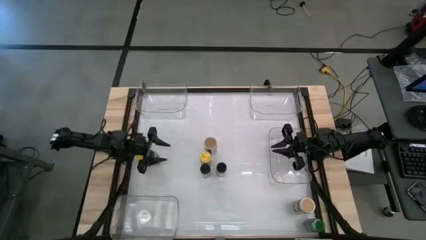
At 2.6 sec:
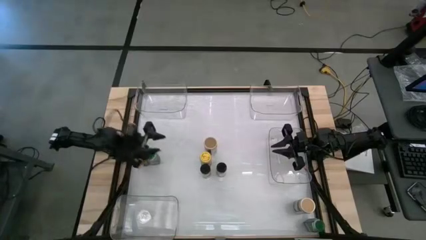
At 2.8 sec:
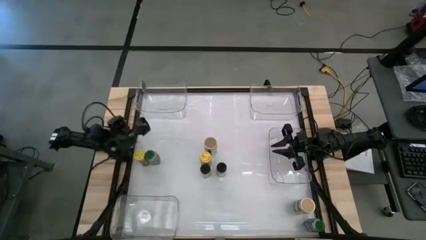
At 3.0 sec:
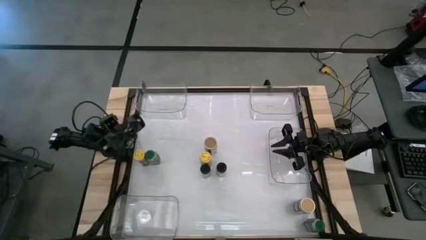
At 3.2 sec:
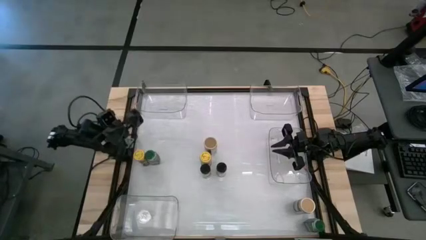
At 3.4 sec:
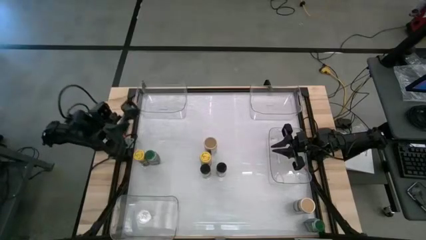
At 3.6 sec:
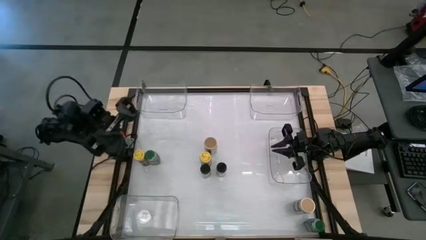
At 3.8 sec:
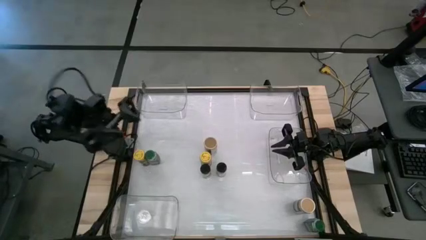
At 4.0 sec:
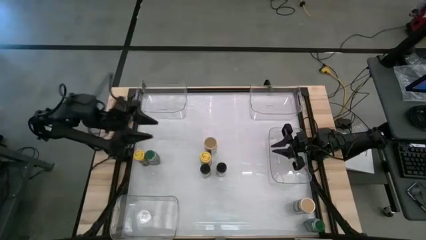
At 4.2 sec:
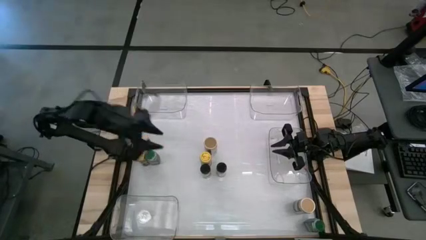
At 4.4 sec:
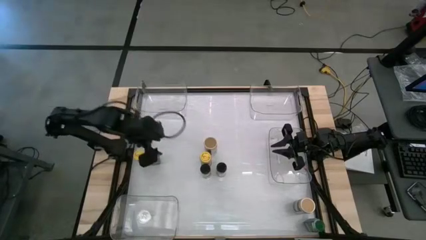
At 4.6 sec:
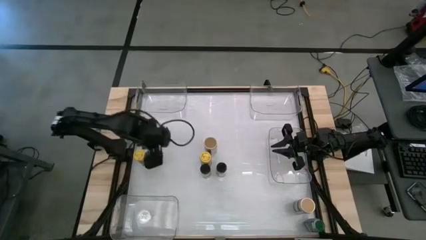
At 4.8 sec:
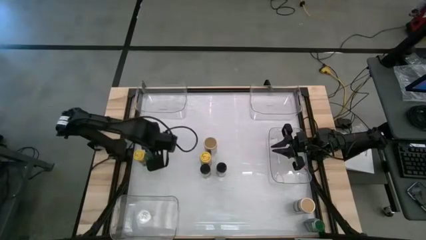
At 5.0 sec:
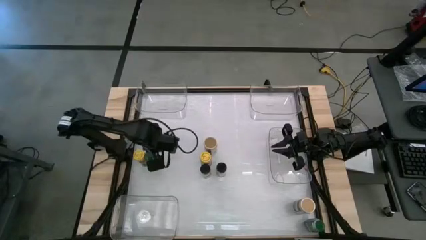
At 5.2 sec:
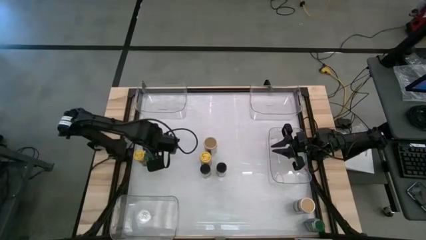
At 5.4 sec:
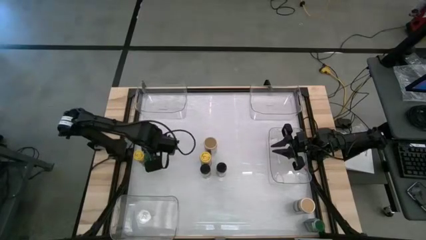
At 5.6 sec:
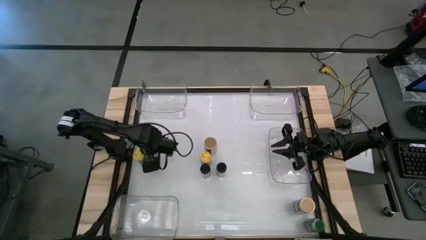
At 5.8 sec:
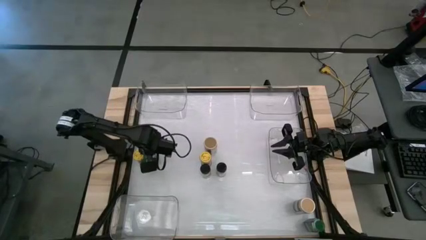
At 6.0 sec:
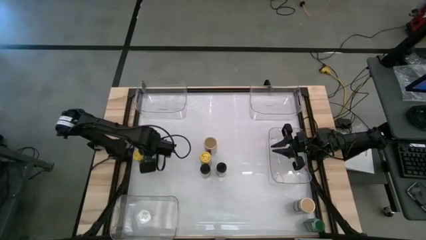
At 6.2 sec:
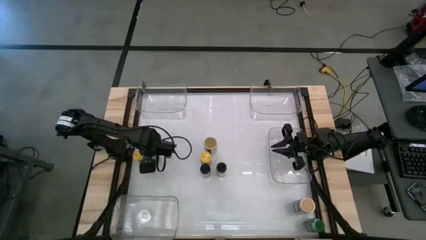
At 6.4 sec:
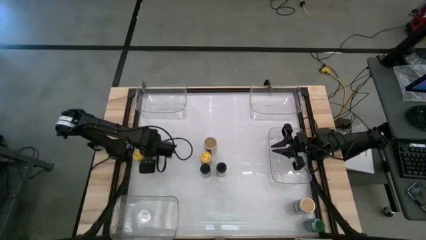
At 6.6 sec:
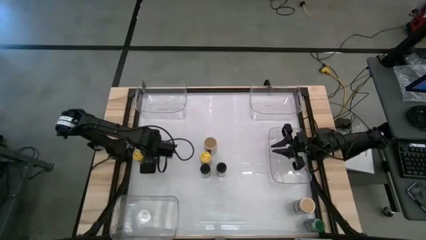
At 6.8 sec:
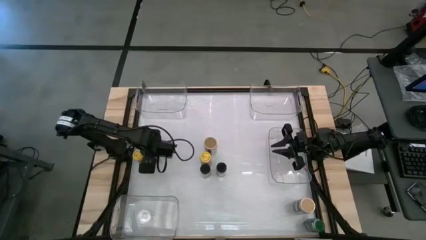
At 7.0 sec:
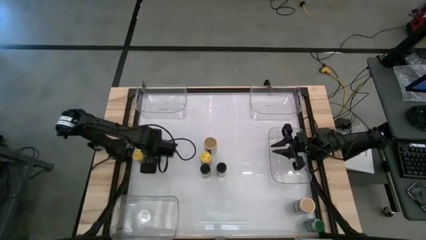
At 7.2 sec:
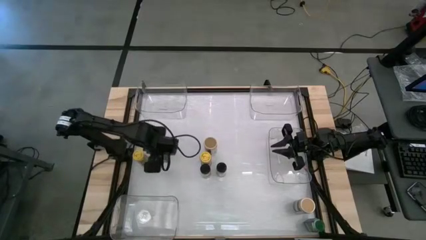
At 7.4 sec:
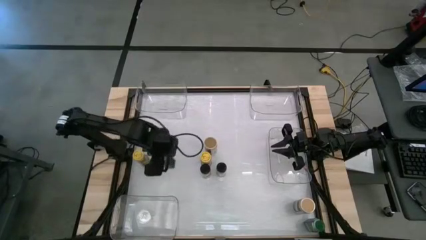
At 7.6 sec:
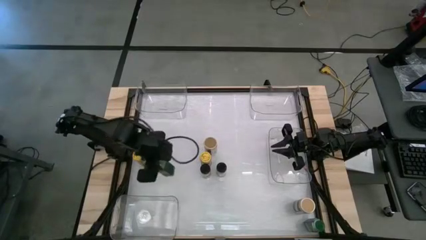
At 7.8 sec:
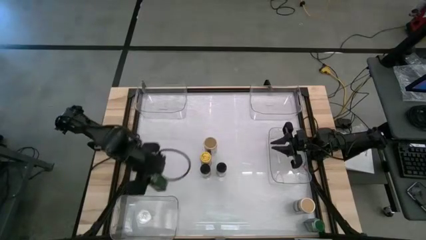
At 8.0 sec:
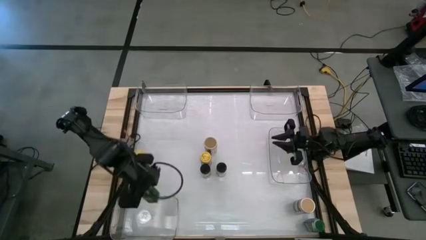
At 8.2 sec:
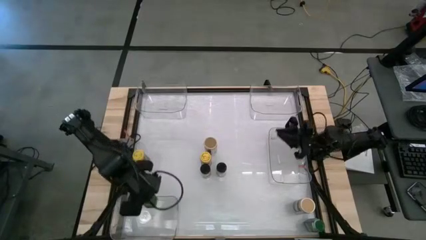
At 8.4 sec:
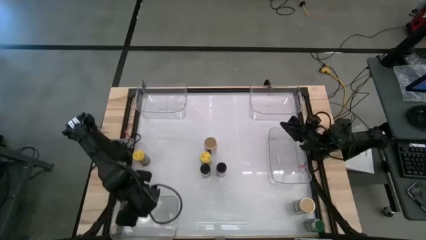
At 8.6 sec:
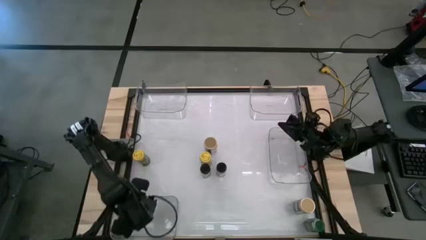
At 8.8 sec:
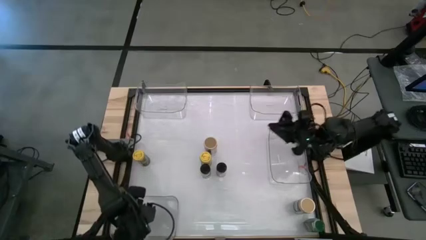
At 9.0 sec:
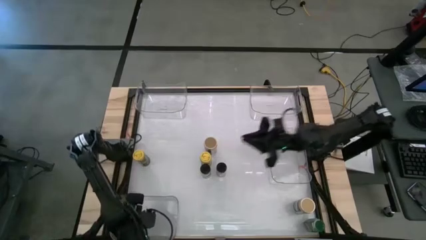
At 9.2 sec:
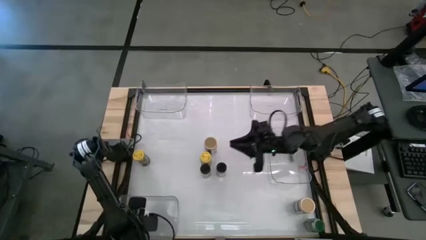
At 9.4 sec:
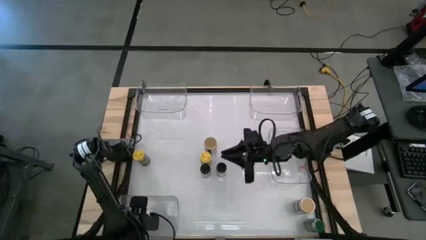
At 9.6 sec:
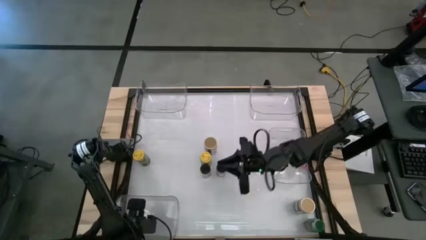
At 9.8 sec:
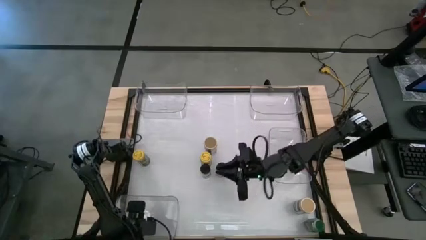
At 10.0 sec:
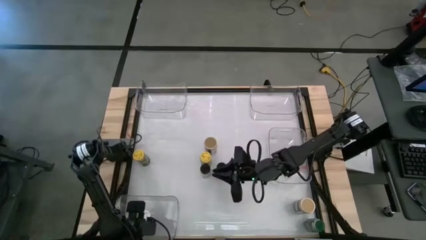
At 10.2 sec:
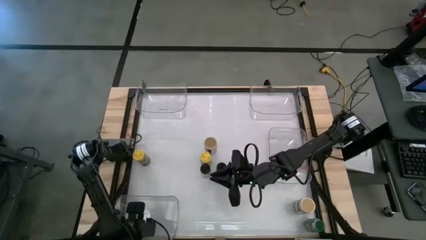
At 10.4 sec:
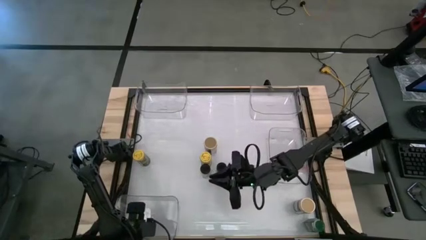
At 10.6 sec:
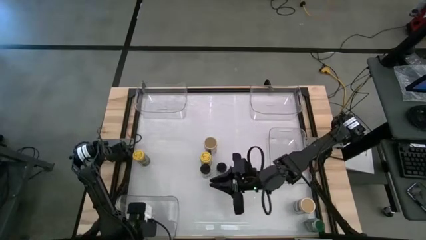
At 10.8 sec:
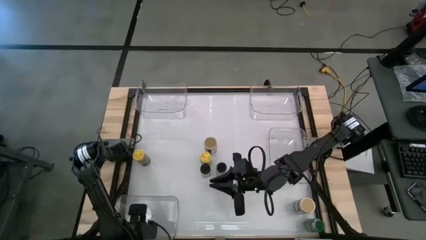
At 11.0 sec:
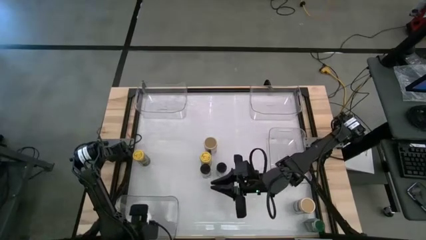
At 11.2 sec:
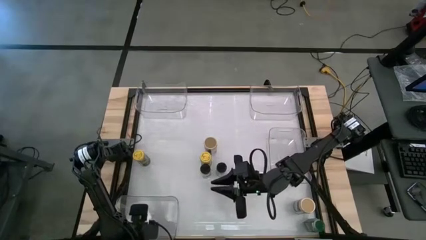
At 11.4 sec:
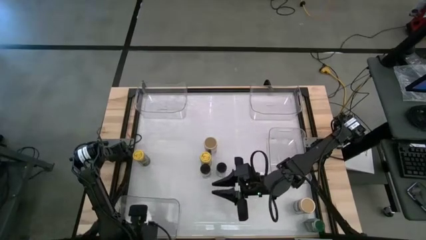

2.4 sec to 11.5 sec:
Task: Sort spices by type
Put the top green seasoning bottle into the bottom transparent bin

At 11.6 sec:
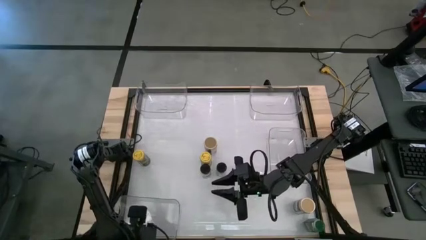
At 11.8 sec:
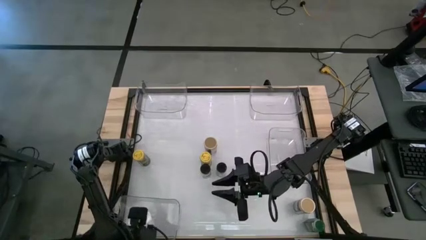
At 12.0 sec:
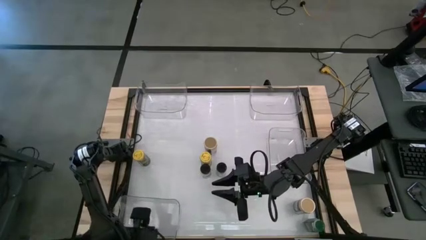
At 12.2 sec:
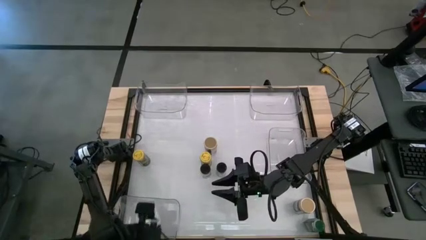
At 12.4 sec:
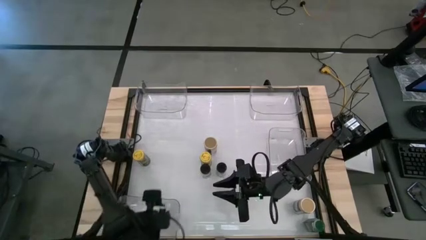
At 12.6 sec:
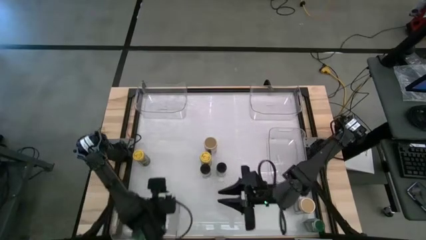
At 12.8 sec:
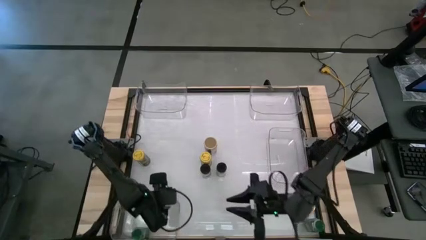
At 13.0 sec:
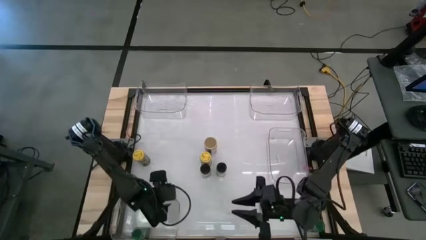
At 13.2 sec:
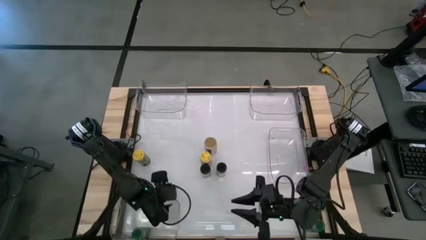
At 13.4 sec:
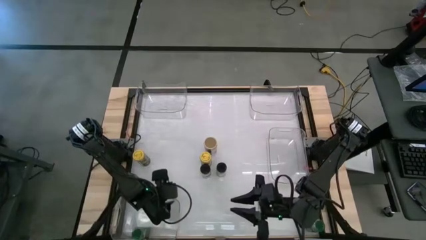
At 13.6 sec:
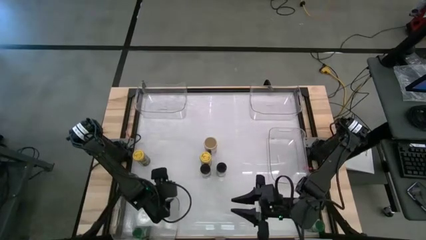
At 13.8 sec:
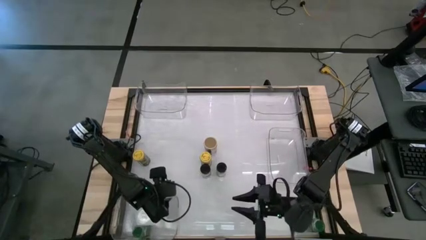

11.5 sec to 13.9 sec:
Adjust the bottom transparent bin on the table

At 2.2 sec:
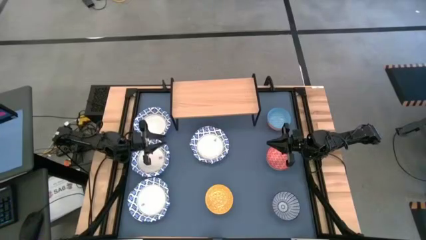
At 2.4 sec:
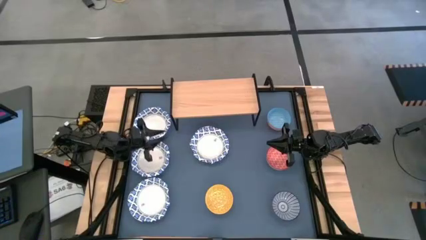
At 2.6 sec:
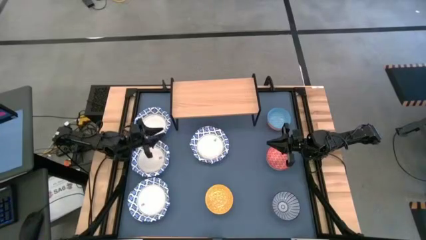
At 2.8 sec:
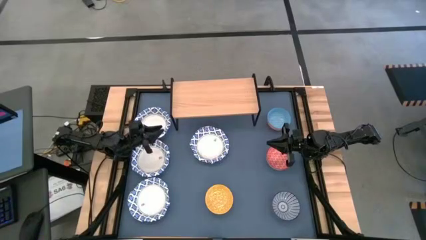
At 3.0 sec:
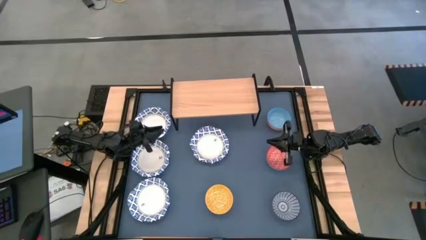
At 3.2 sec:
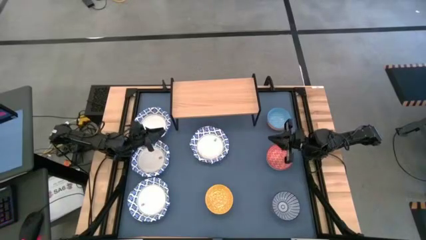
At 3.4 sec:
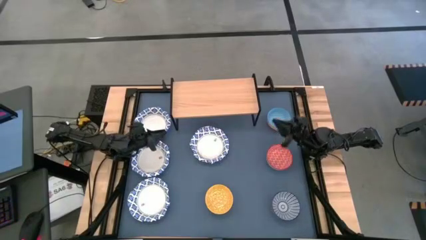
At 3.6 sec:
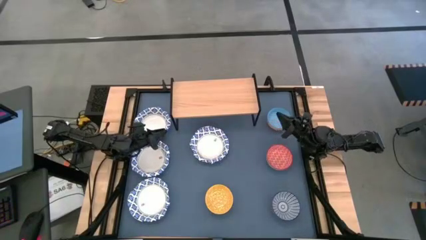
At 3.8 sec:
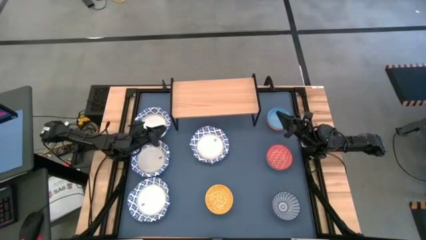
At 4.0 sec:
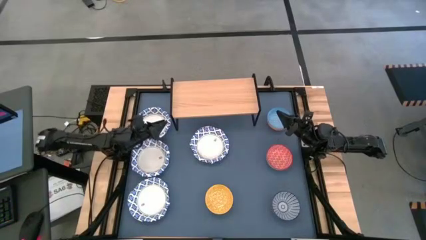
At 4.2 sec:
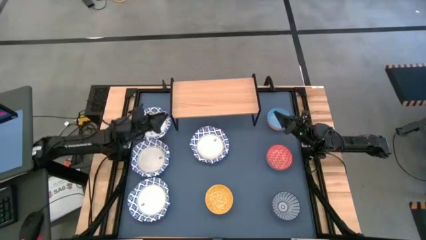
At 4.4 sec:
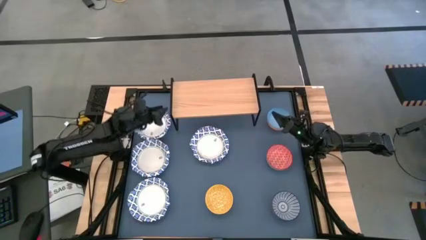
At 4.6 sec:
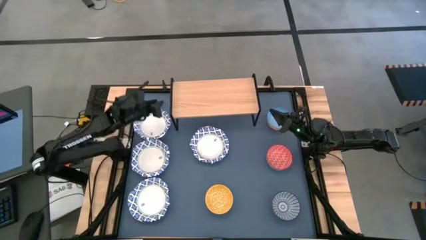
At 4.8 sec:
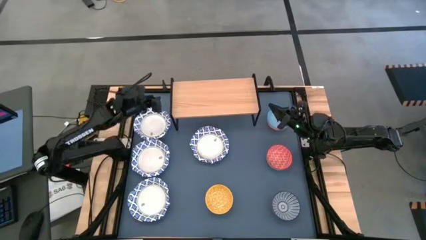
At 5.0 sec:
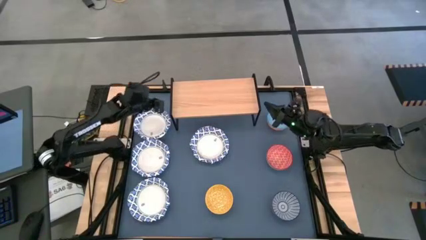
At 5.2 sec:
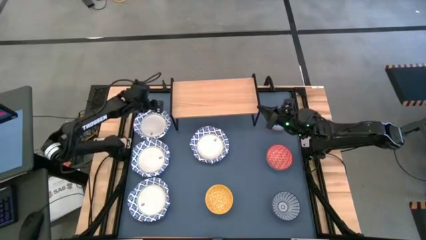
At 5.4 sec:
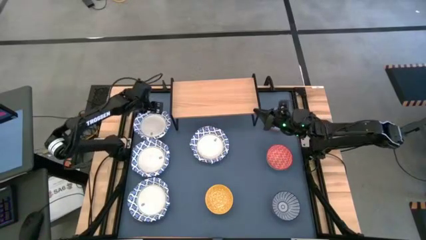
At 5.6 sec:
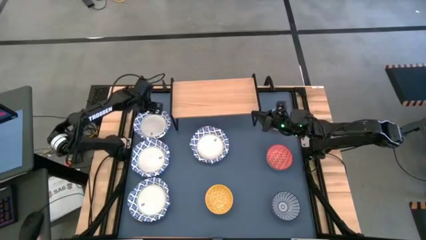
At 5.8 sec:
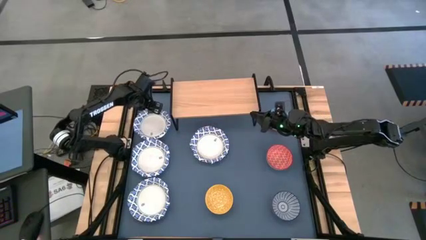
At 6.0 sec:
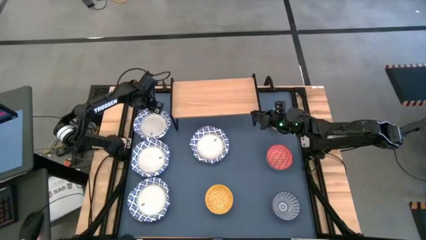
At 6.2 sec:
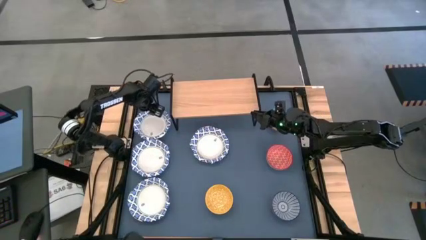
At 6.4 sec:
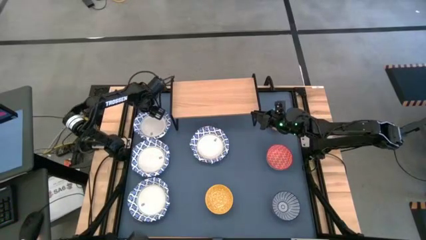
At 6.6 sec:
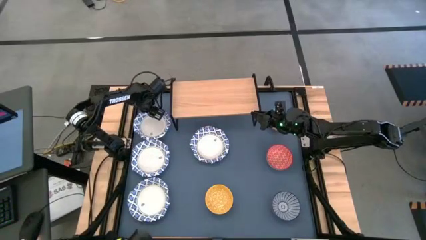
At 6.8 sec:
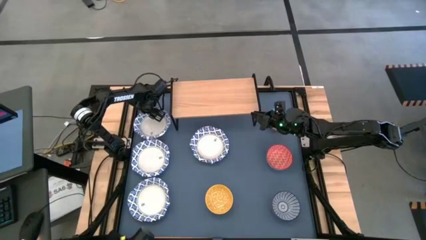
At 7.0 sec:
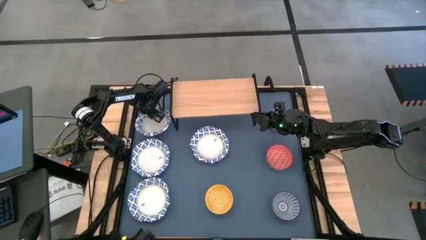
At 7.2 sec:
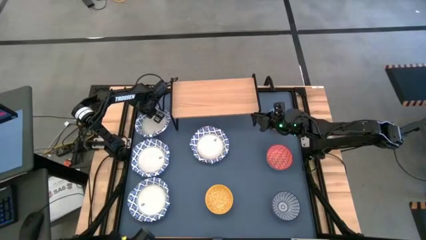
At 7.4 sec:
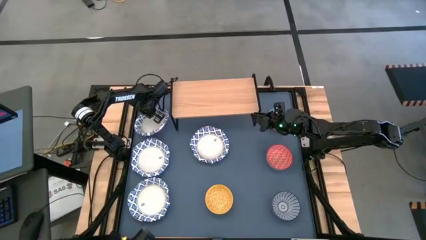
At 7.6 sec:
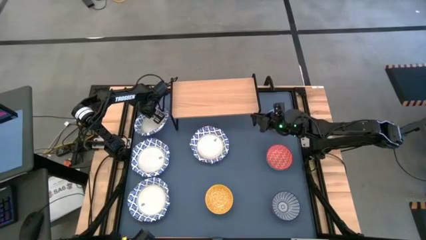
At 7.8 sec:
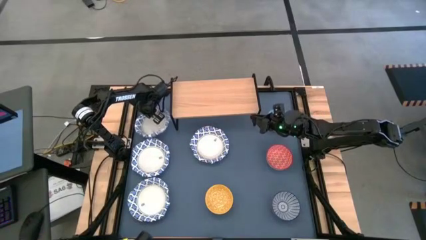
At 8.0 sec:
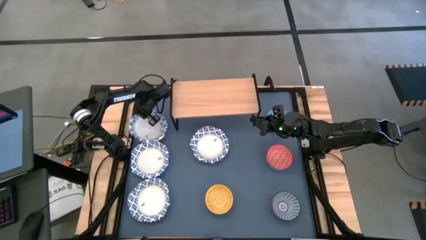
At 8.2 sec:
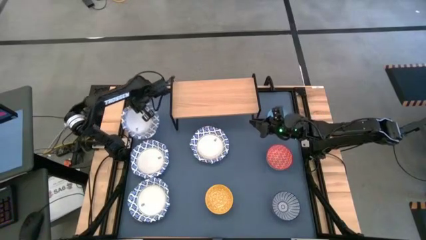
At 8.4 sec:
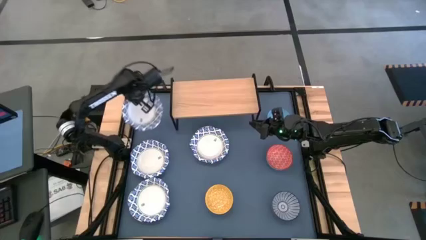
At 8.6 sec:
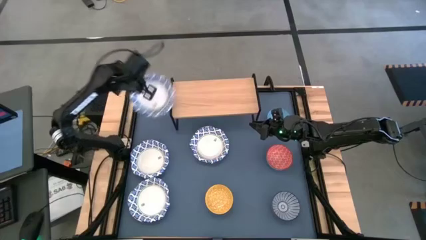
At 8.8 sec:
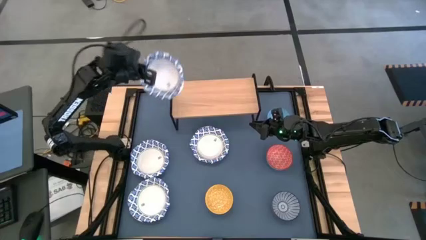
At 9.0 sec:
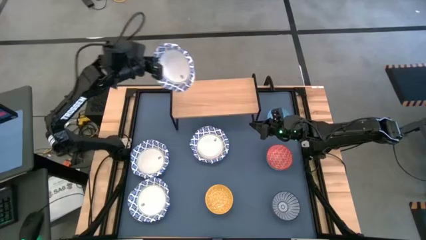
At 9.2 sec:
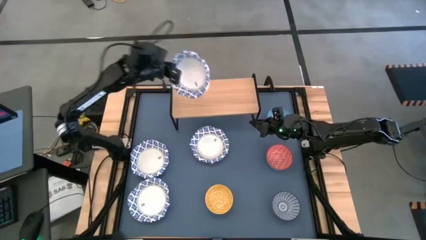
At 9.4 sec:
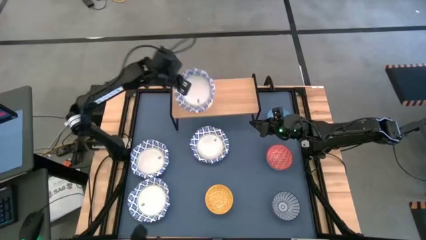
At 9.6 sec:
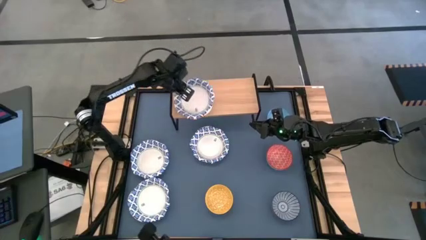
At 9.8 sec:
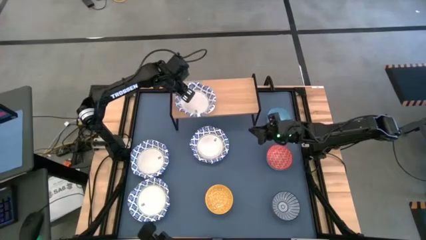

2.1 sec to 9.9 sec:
Task: Place and stack bowls onto a shelf
Put the white bowl on the shelf
